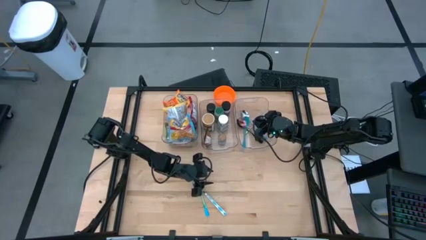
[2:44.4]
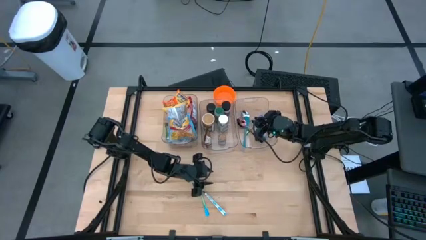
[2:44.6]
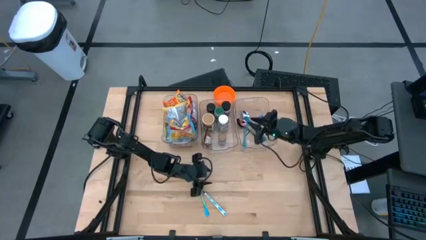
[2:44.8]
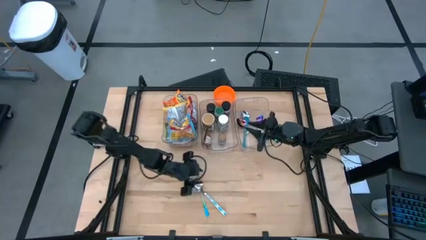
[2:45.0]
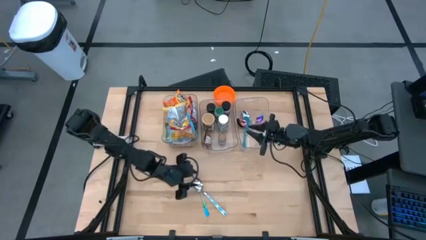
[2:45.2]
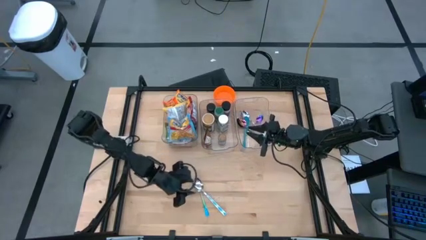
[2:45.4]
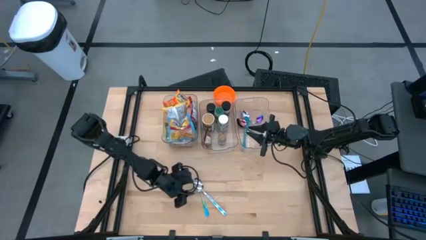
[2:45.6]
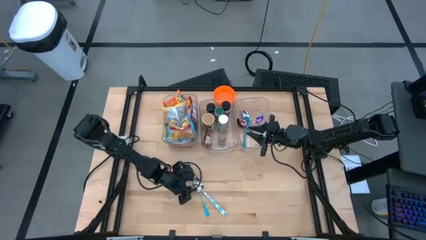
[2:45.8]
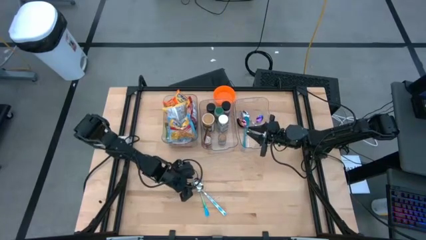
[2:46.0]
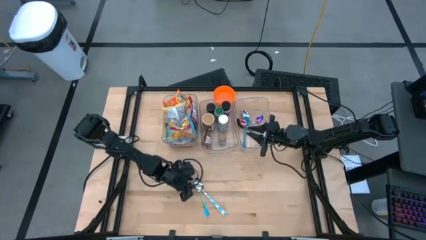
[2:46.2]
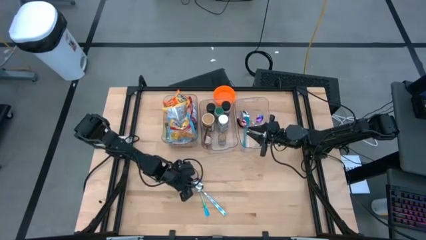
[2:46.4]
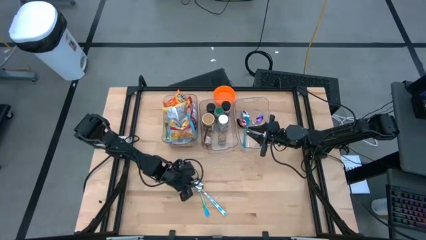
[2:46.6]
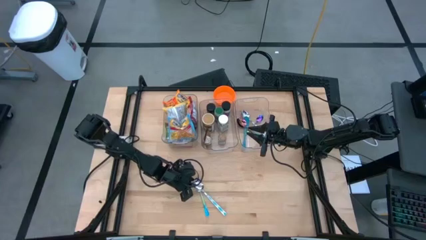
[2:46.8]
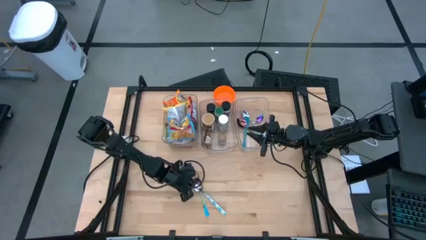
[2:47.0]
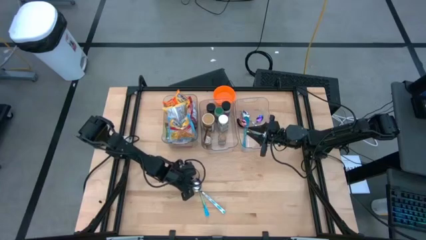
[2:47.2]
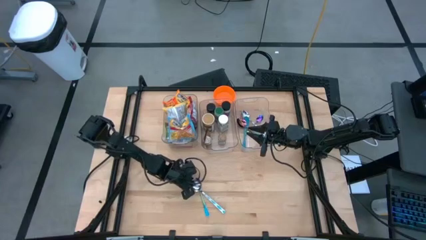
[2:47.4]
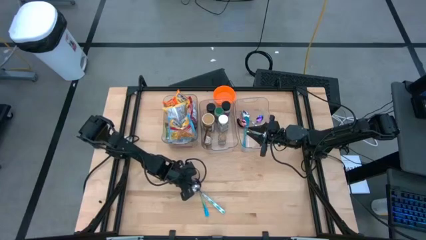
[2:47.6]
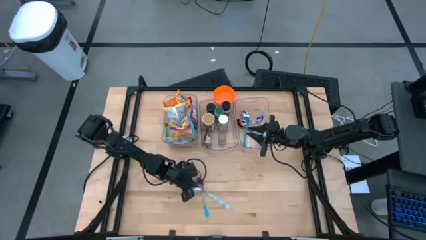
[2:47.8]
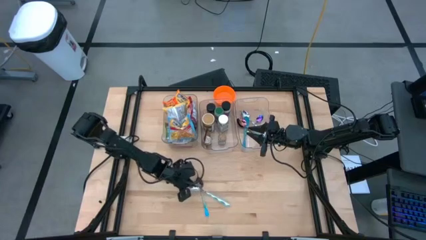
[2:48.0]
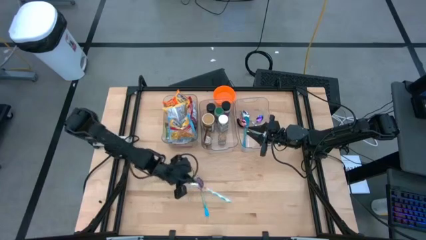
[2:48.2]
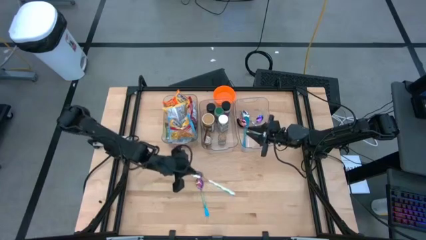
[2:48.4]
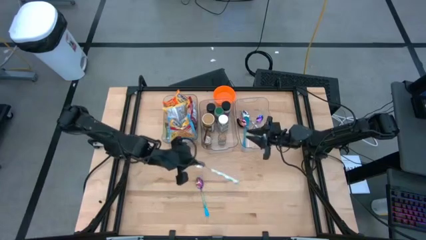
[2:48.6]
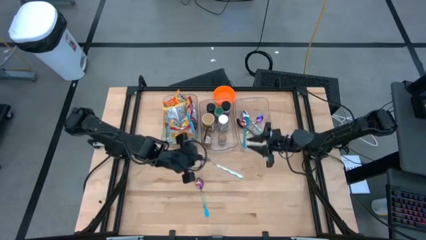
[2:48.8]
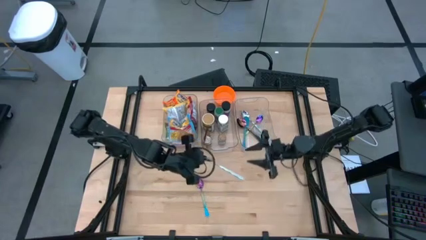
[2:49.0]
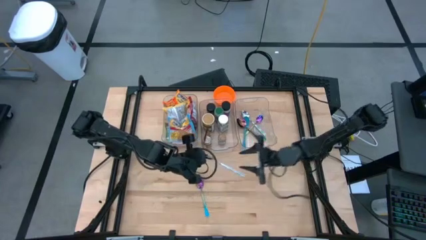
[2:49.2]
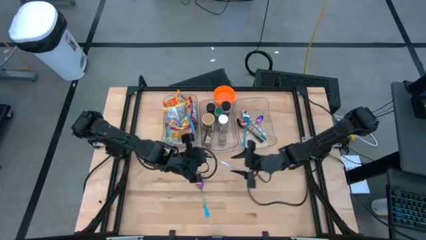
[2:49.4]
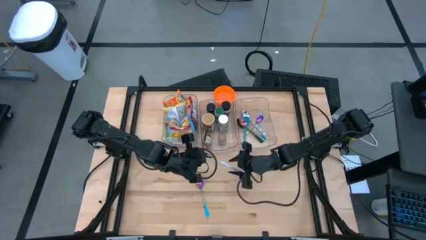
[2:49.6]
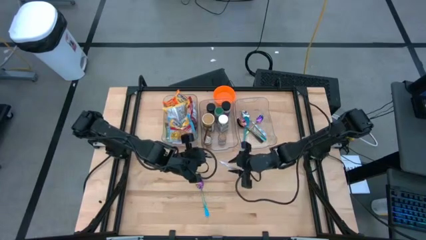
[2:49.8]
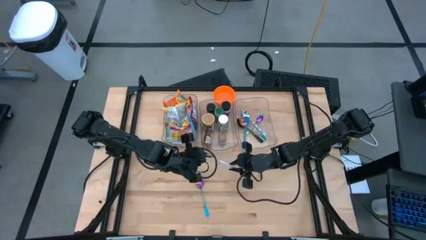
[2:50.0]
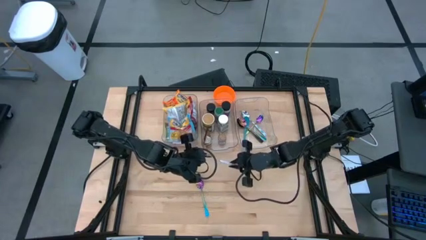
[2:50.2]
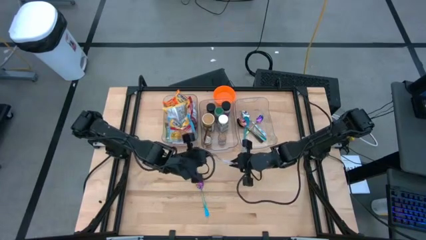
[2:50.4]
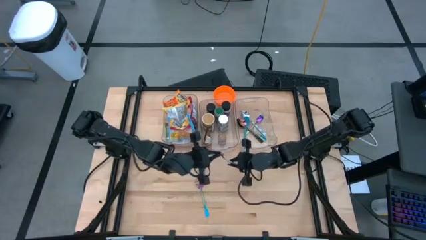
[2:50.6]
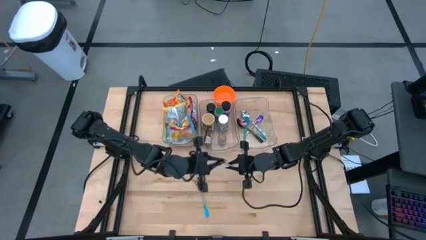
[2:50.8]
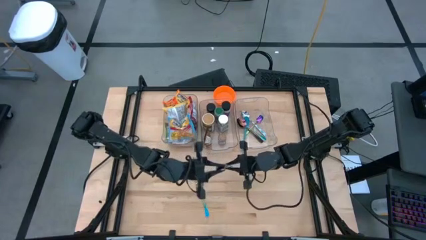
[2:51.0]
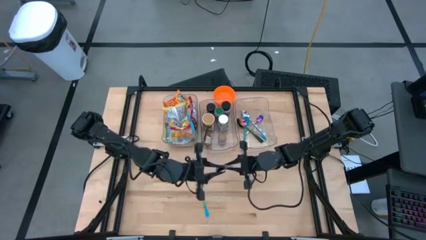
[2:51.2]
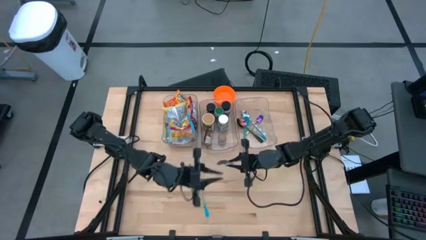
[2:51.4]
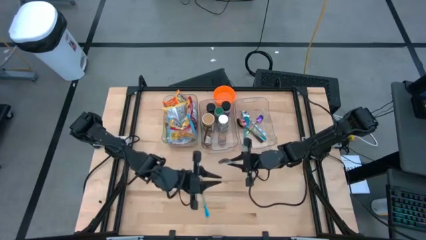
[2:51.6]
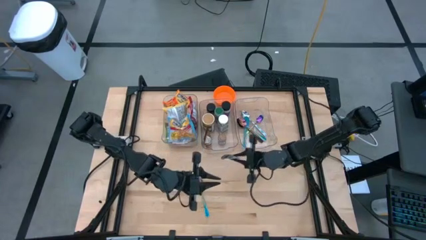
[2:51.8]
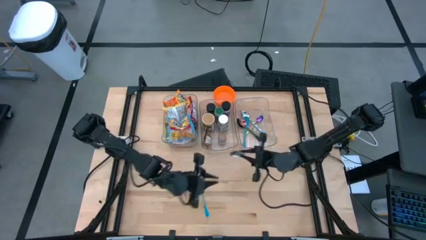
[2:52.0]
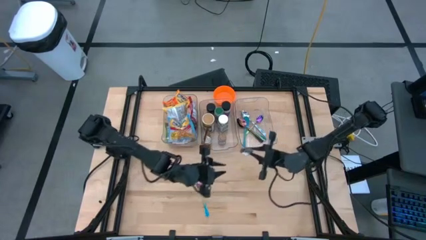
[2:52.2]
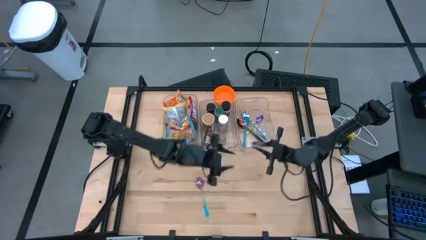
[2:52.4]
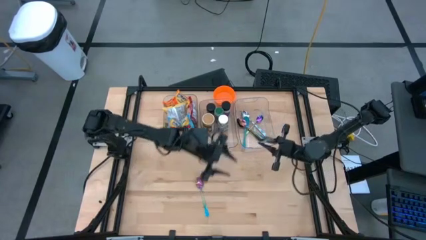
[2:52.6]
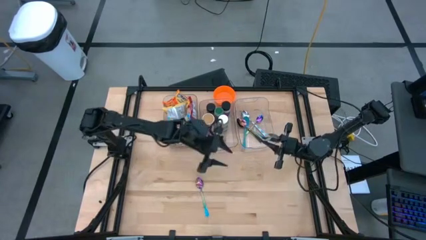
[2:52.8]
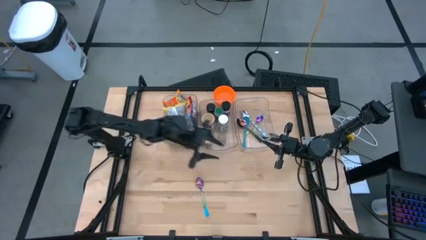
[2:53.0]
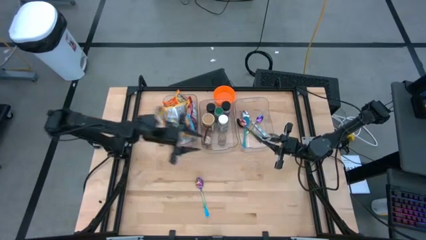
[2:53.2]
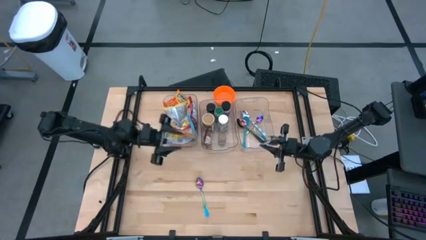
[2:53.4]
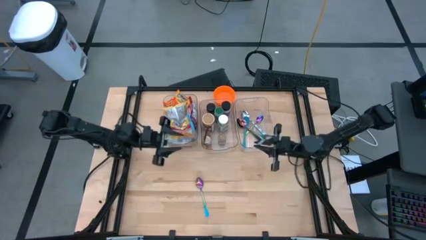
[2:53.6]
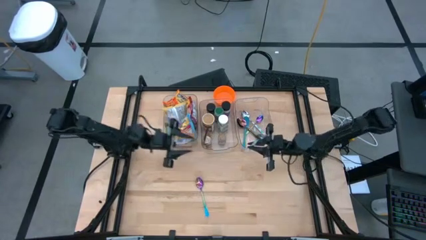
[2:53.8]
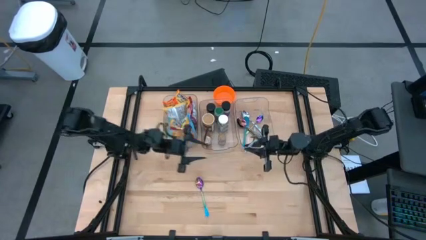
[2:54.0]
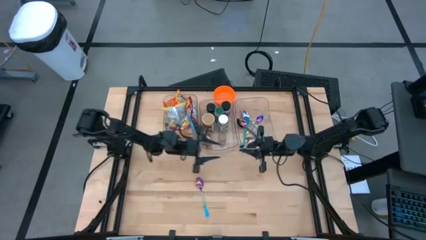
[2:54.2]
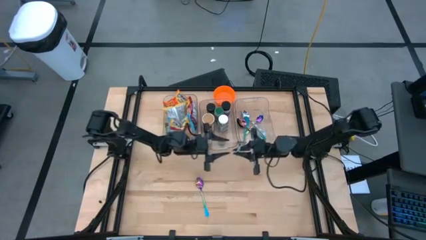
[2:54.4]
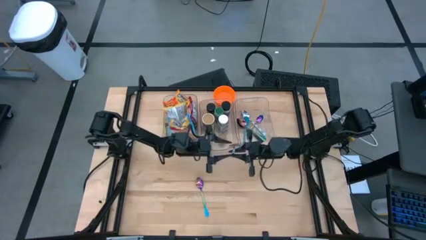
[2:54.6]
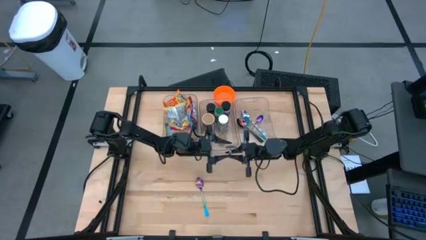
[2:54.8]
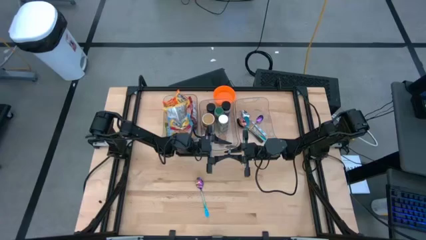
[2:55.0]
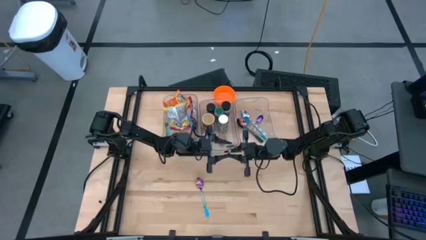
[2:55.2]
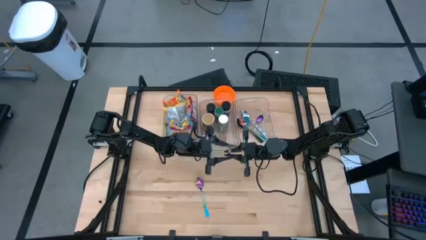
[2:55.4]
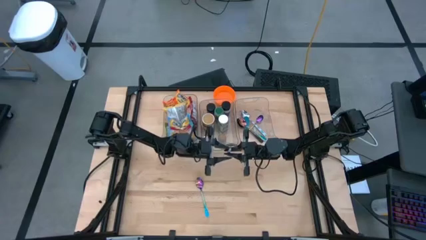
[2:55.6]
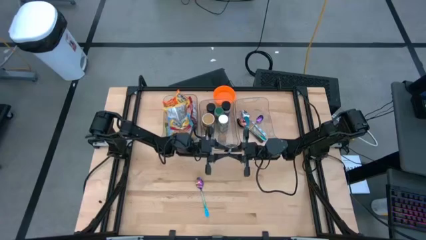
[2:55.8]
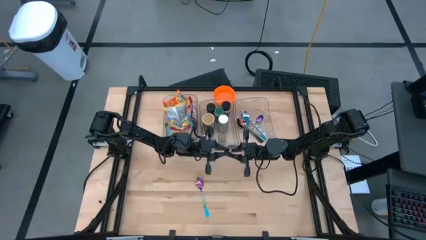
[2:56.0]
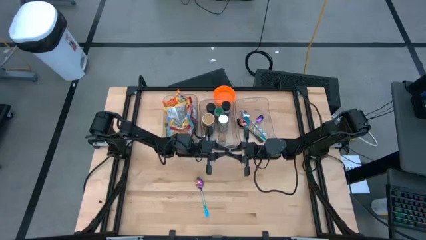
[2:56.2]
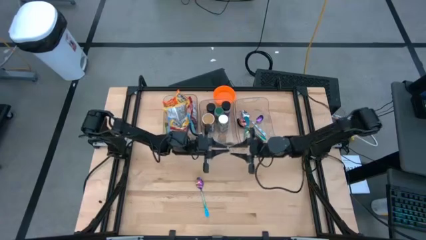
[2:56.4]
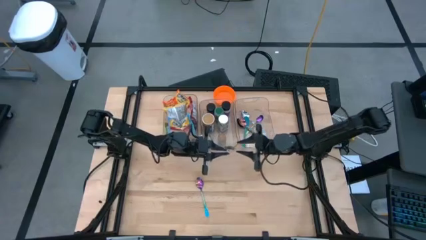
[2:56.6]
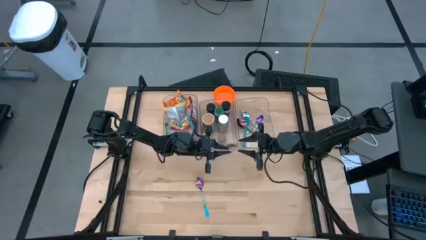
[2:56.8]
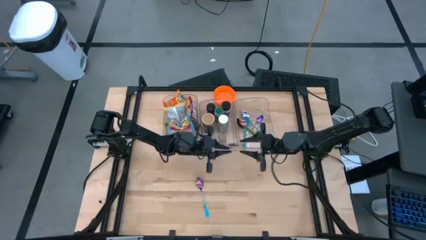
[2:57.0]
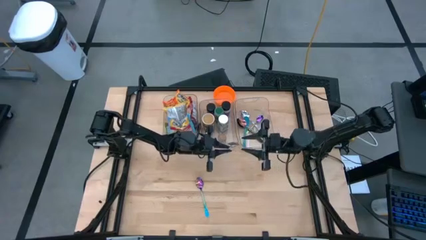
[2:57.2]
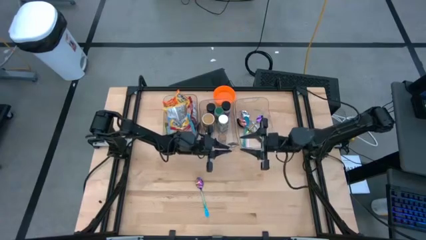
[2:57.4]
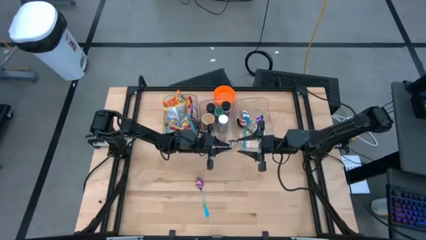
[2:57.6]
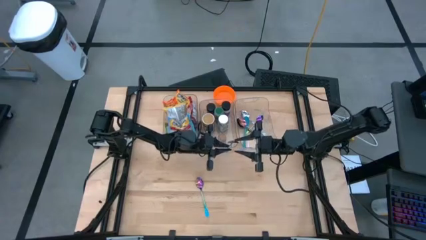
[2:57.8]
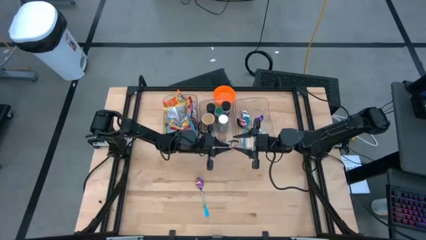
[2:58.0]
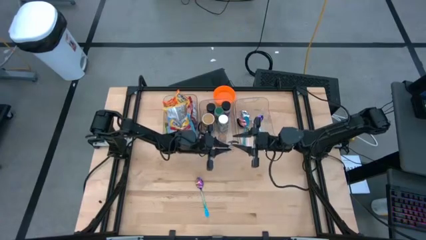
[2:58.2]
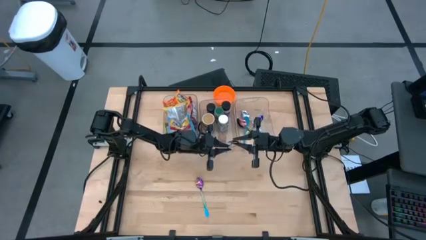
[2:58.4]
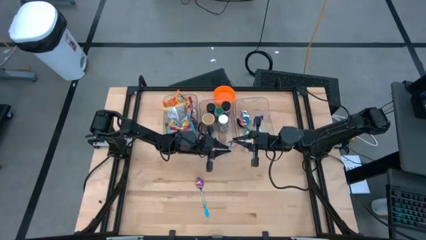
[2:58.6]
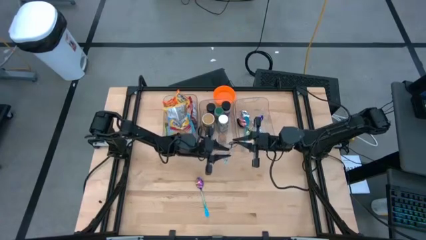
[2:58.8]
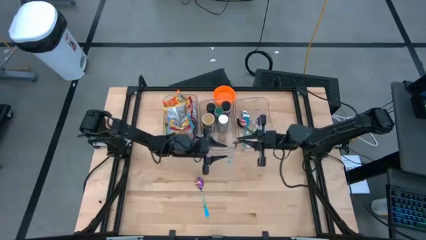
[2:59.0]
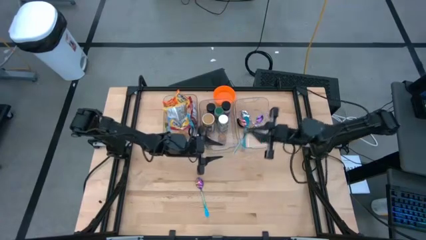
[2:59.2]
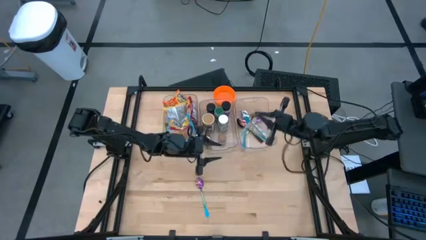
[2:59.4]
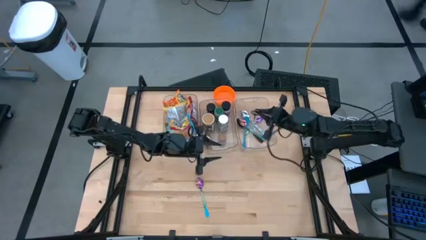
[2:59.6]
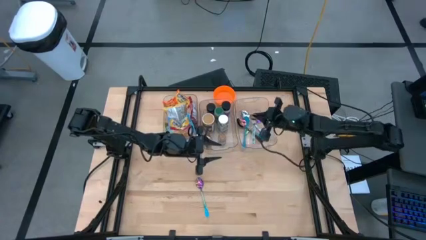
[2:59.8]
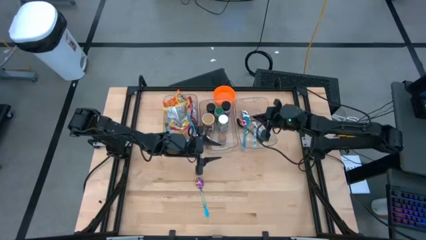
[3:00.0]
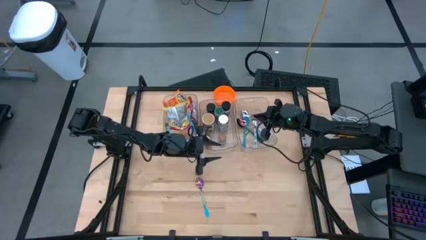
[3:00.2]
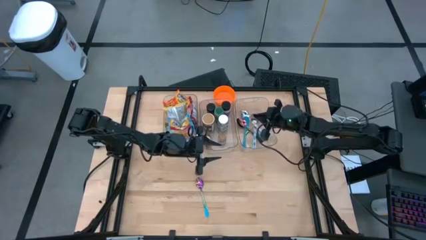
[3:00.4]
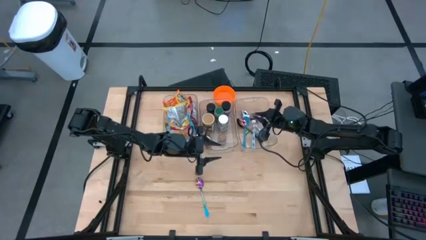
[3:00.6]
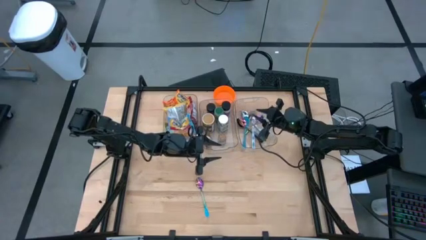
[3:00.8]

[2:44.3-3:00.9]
Task: Pick & Place Food Item
Put the patterned spoon into the right transparent bin
